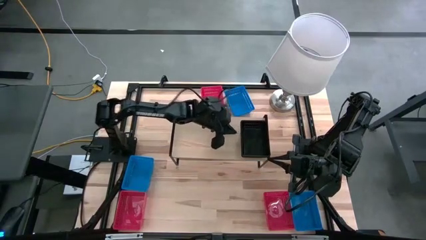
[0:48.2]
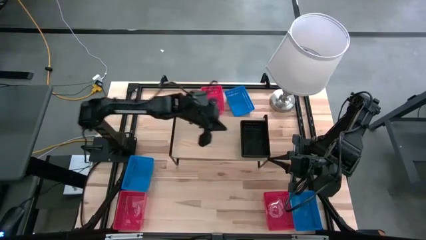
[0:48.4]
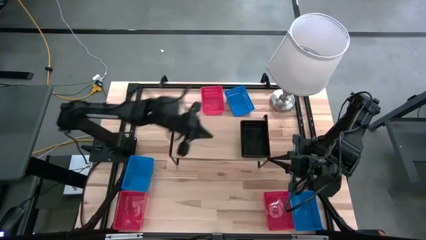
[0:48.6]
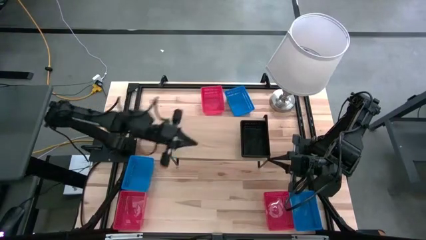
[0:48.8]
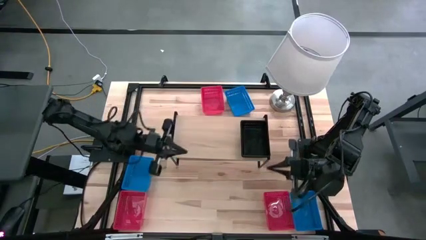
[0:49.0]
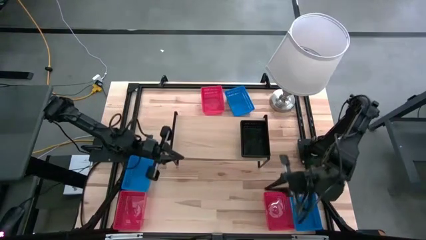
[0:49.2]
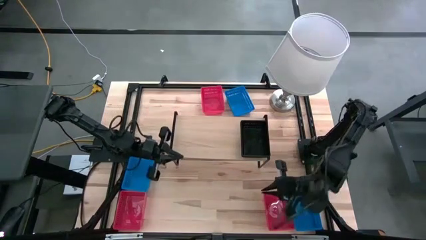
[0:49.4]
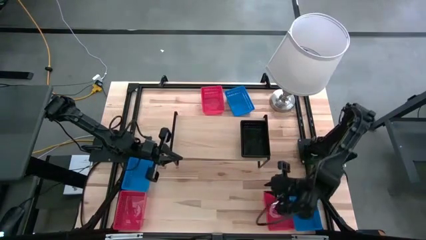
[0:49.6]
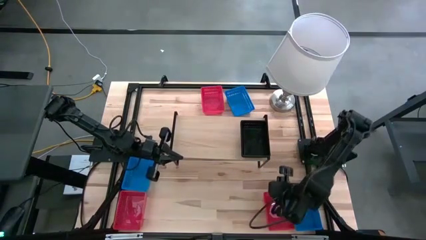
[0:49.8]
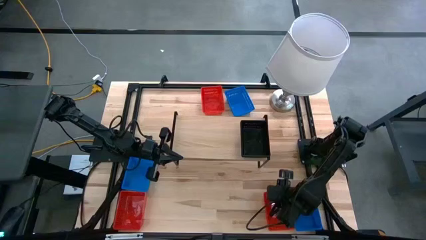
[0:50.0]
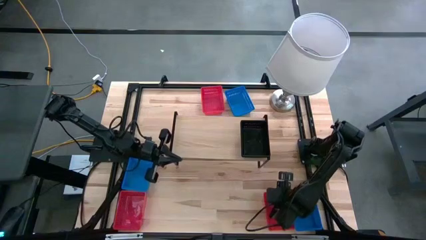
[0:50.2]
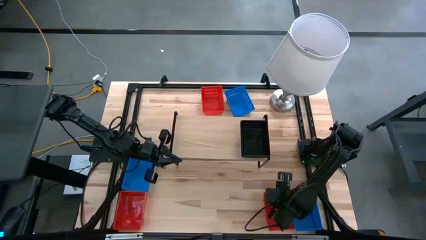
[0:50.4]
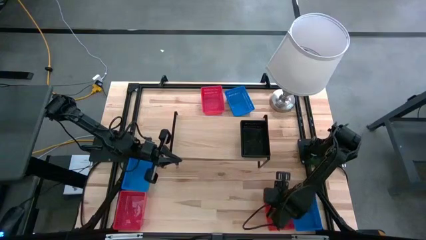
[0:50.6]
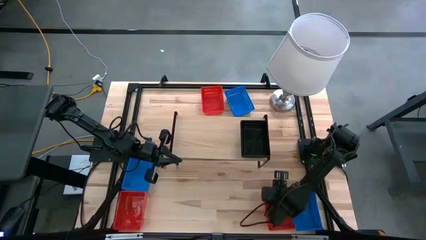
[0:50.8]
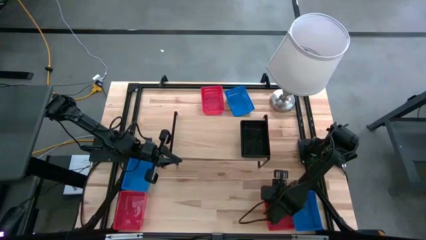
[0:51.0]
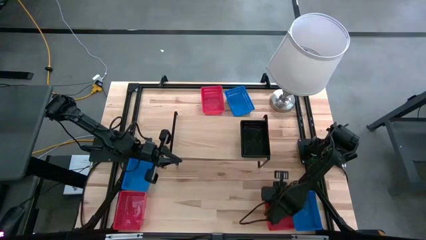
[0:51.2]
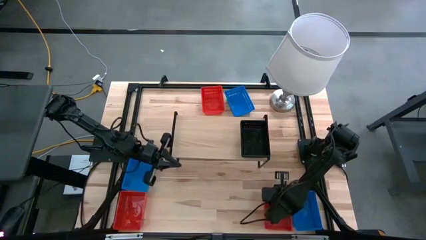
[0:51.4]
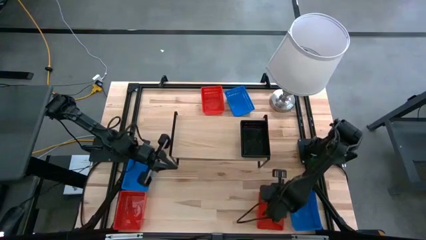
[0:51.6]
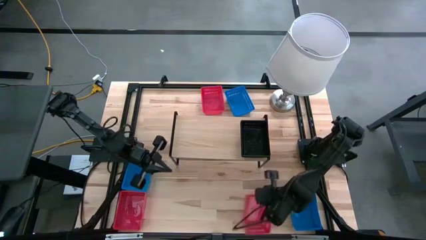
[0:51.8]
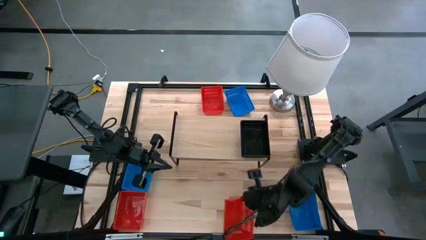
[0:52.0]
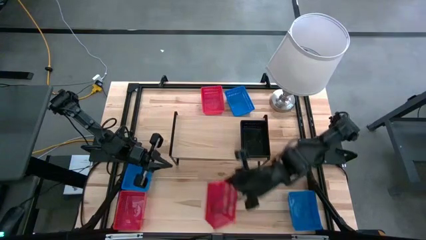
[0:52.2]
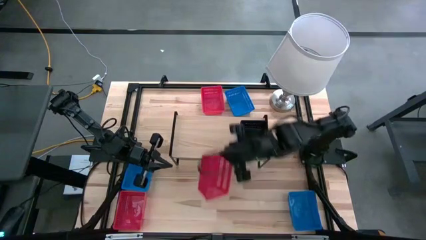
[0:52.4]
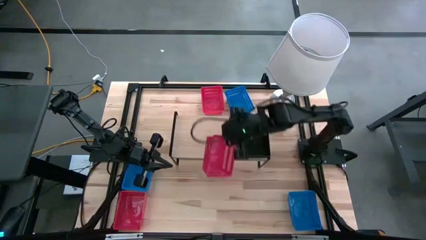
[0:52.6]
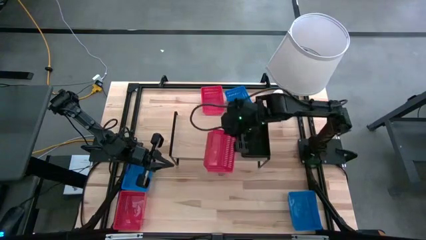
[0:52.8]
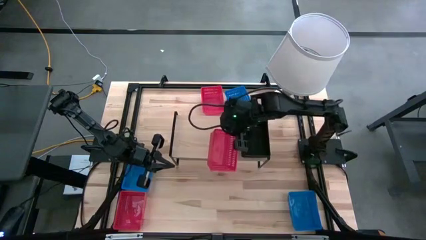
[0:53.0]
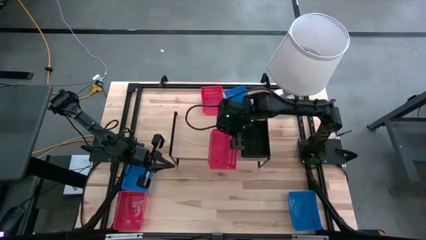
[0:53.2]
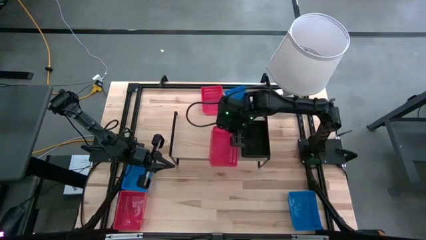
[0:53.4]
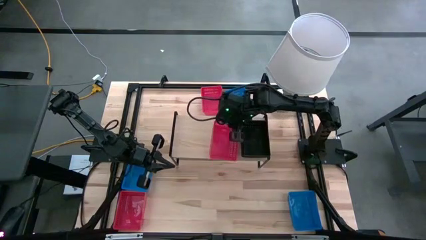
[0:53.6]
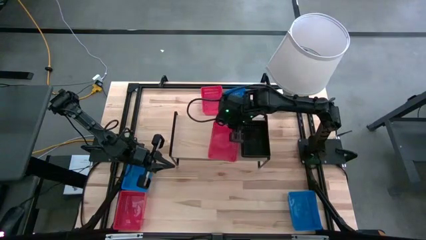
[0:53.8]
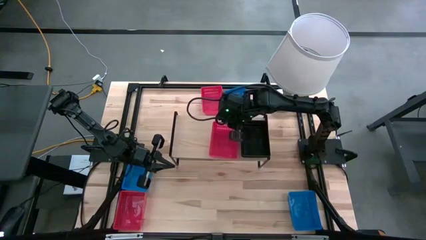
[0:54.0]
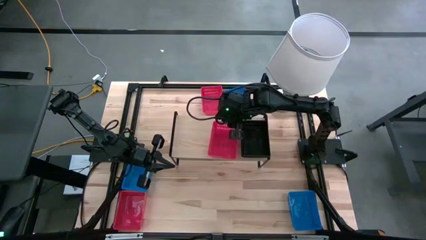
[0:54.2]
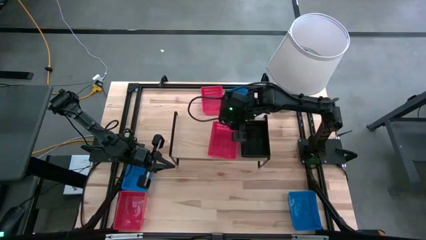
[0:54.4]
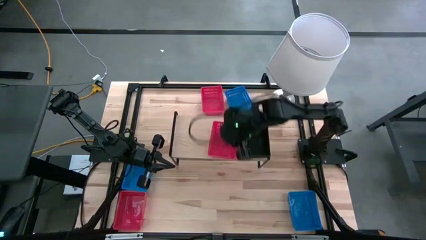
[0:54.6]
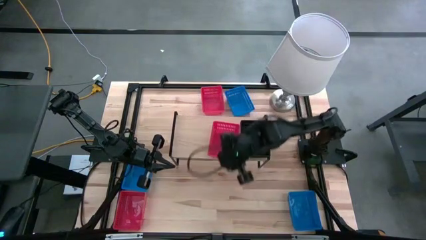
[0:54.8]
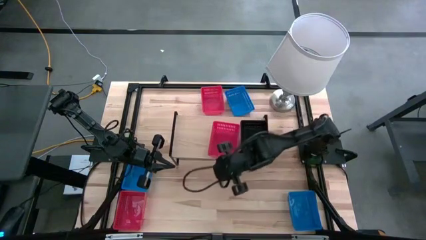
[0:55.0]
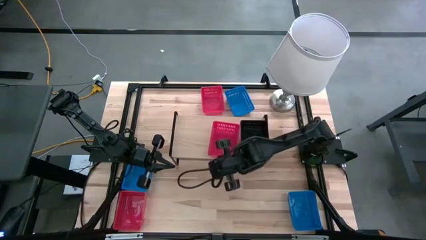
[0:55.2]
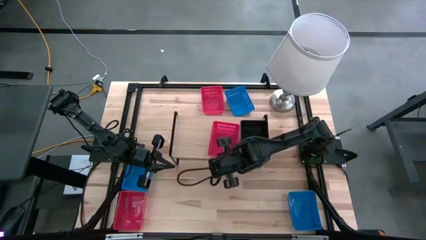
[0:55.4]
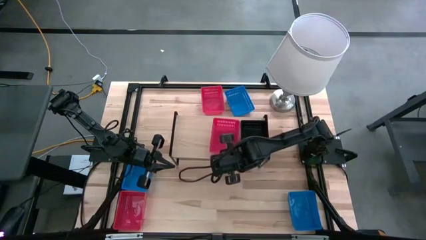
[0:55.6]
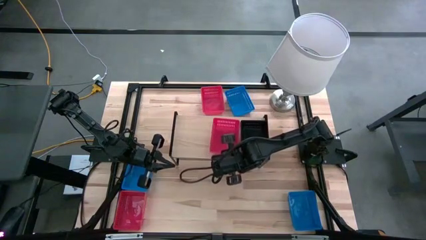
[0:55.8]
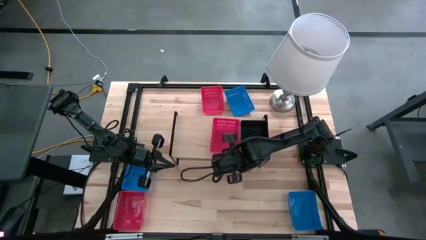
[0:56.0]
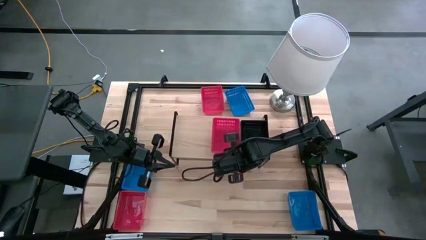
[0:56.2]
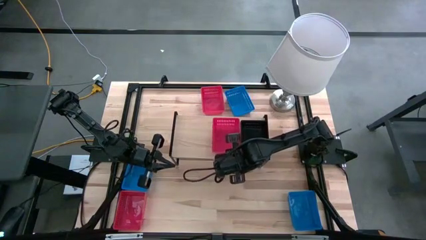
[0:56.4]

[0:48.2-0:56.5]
Task: Stack baskets on shelf by color
Put the bottom right red bin on the shelf

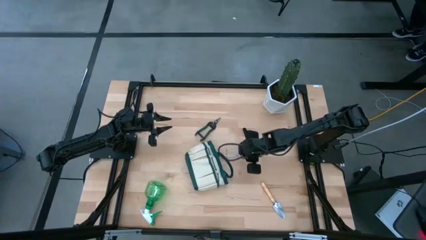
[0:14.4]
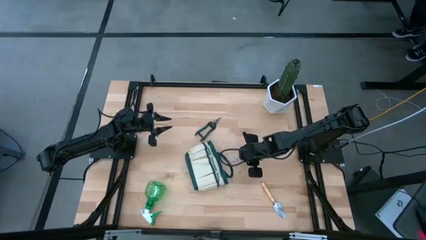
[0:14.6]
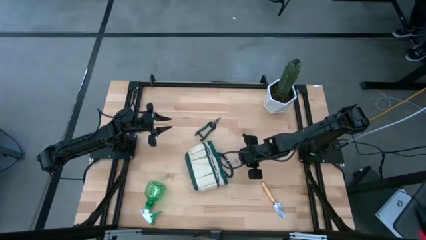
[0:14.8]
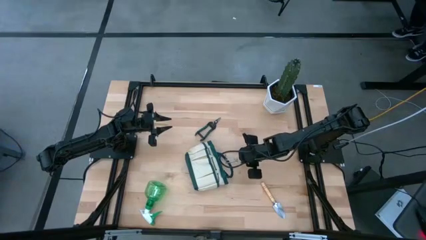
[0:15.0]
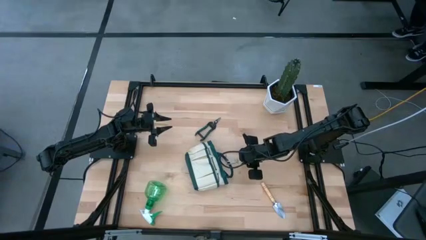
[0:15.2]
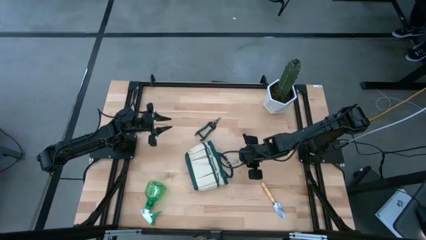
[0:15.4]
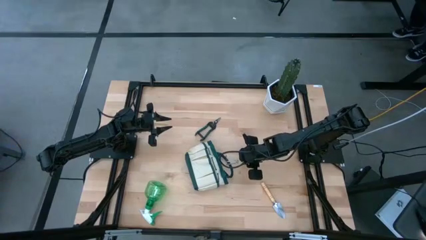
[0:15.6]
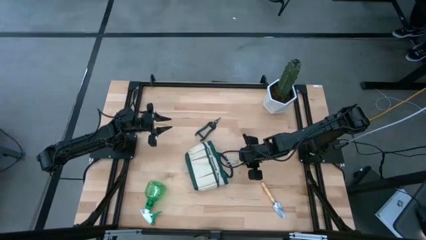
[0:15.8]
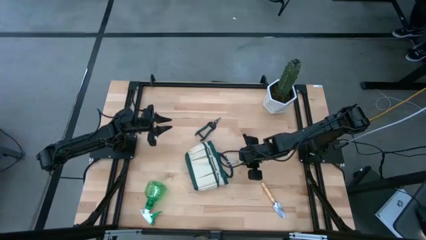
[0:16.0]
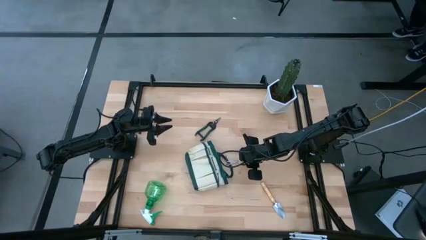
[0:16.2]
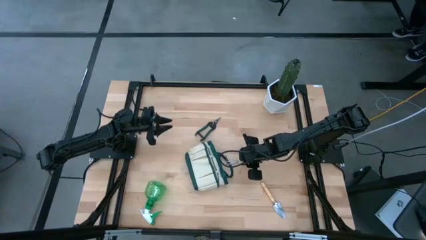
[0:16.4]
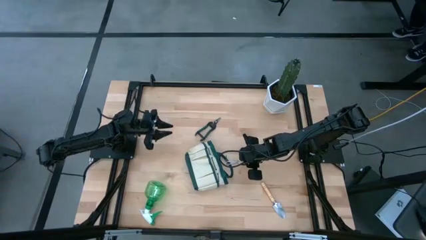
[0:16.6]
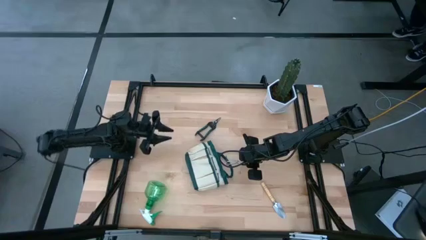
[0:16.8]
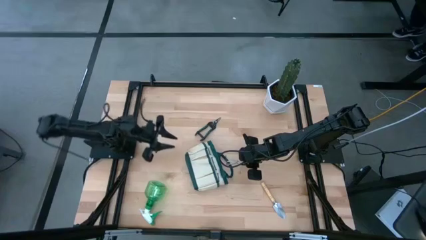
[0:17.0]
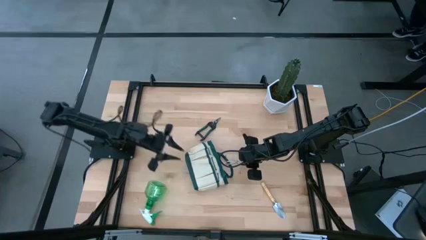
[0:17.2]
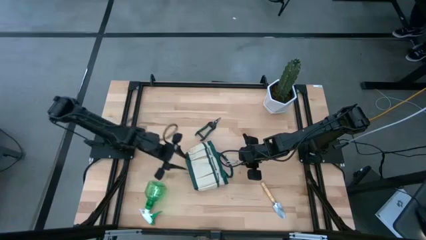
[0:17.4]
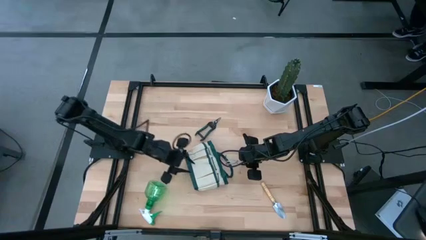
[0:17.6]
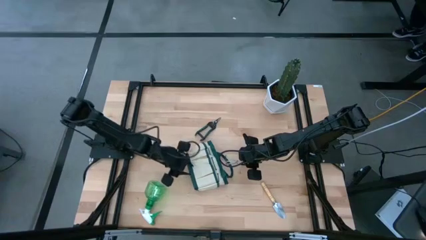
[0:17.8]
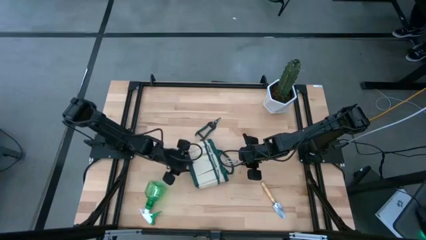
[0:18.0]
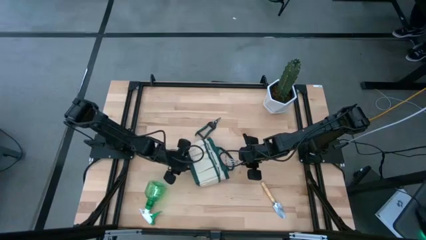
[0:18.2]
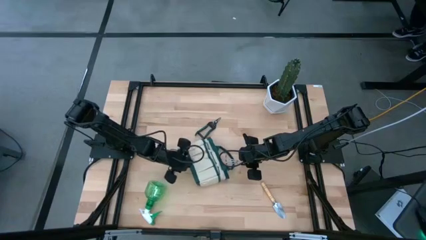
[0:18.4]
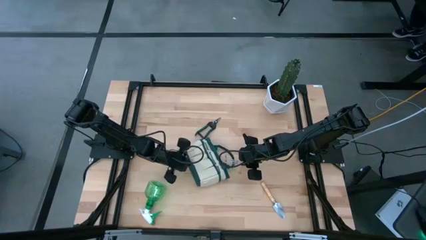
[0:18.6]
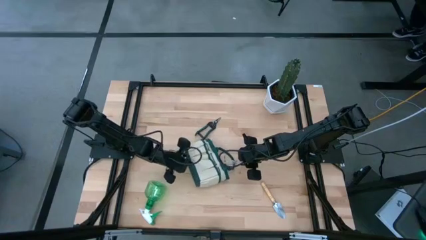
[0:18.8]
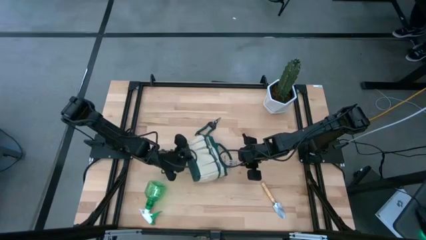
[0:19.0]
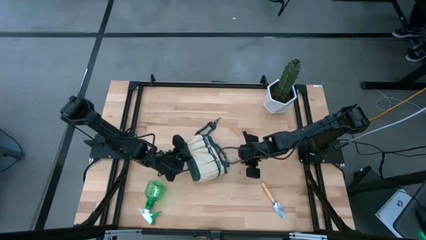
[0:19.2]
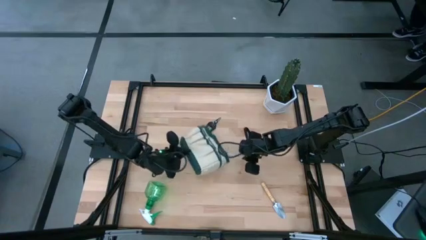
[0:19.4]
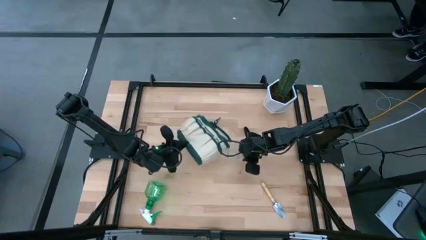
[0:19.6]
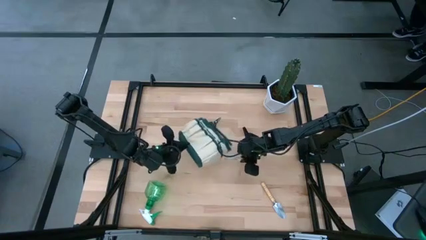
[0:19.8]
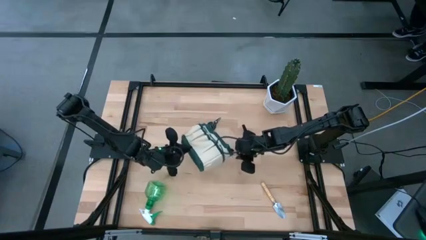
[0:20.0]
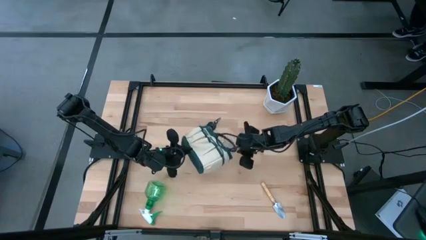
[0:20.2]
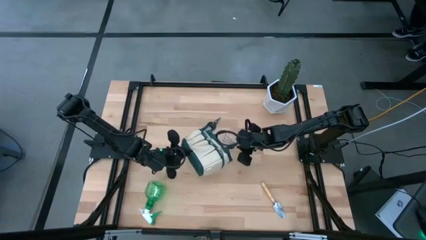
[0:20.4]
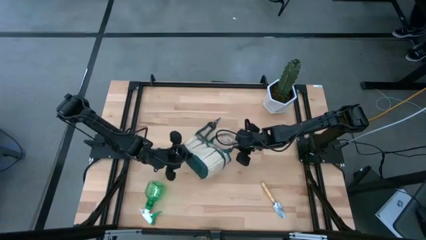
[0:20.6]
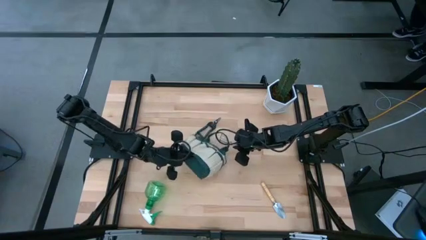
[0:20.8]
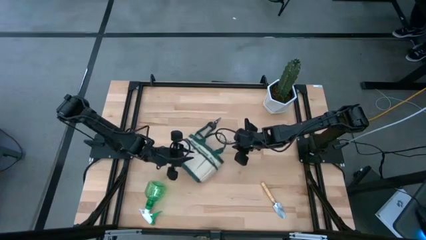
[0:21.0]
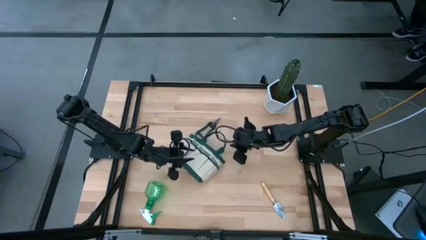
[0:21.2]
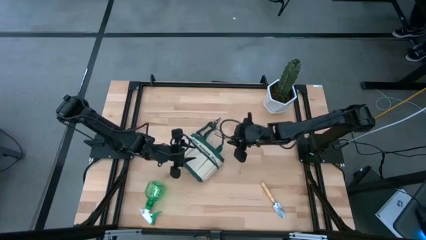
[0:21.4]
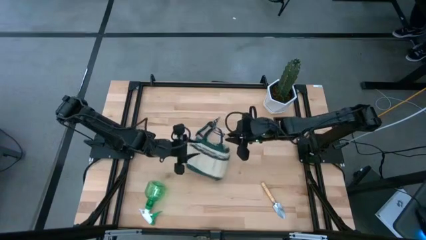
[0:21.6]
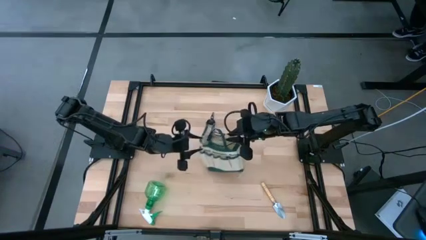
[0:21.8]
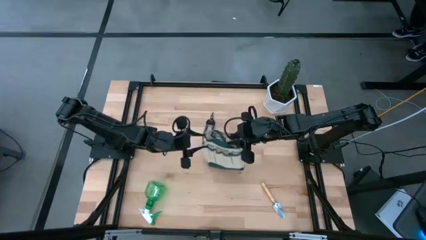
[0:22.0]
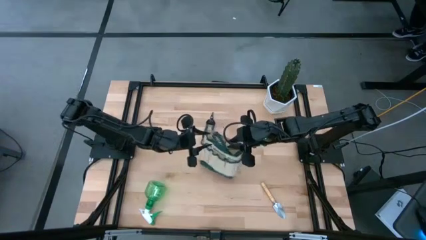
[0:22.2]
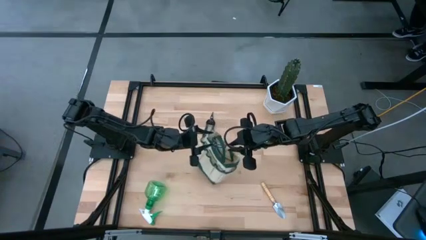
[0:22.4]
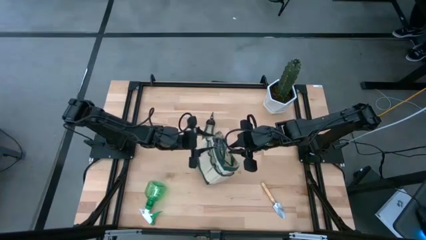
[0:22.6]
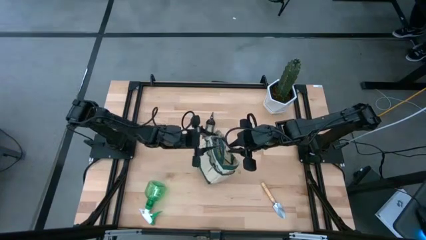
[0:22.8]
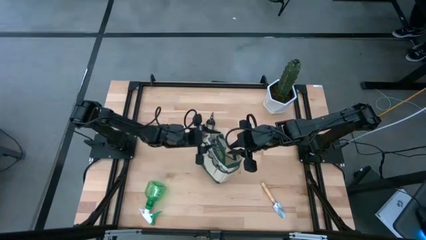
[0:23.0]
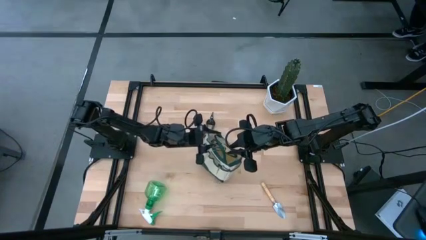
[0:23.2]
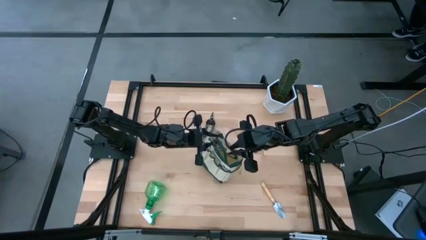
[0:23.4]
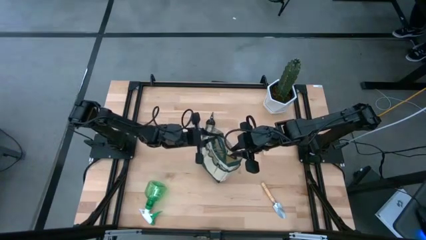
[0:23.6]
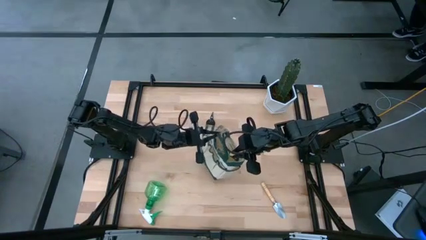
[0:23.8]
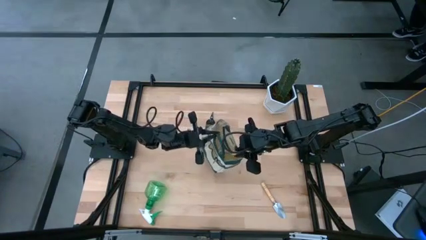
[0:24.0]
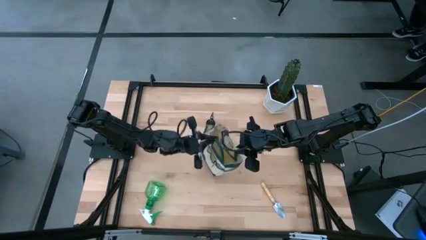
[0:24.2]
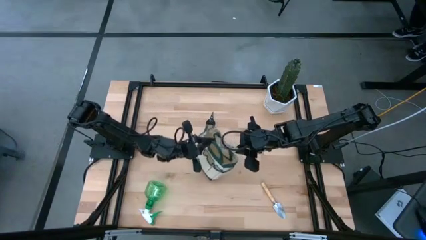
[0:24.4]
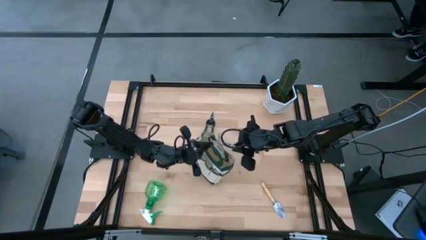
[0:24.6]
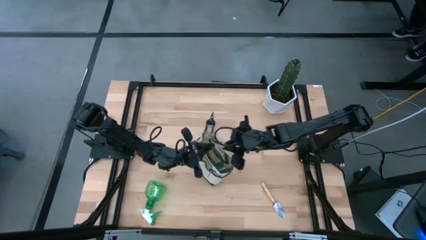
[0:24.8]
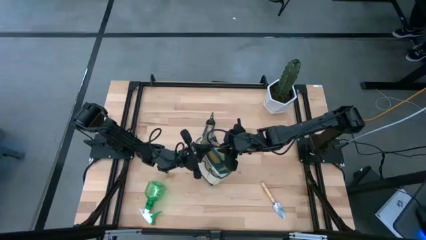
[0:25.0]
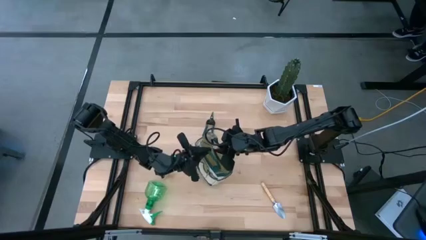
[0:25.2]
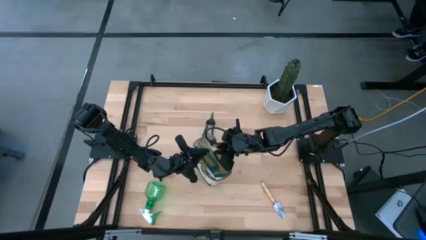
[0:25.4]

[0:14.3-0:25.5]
Task: Pick & Place Garden tools in Gardening bag
Put the brown hand rake into the gardening bag
